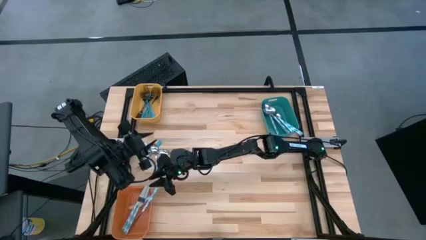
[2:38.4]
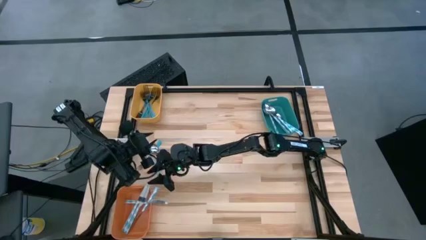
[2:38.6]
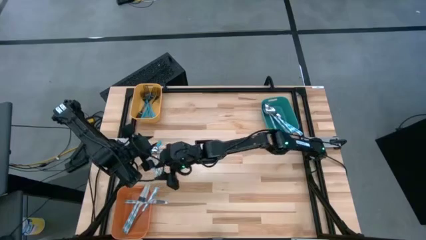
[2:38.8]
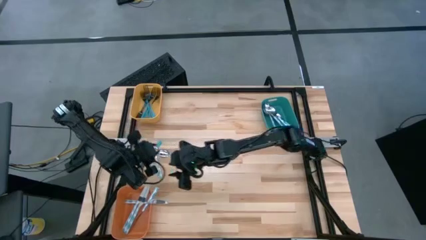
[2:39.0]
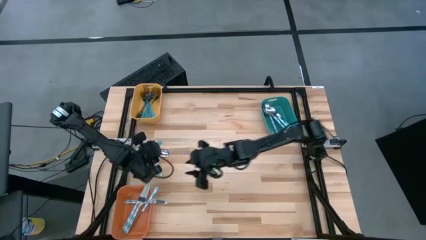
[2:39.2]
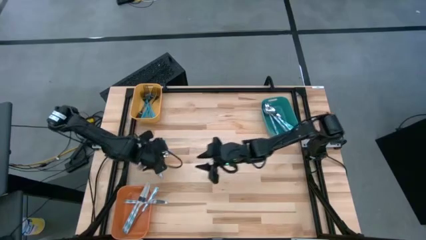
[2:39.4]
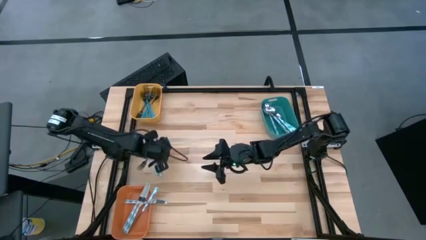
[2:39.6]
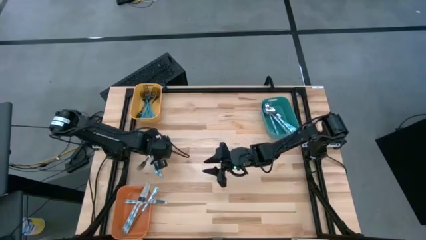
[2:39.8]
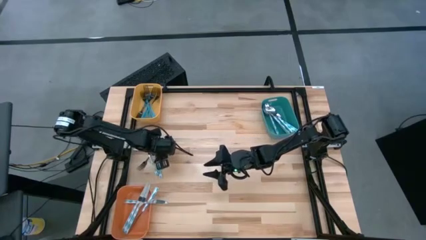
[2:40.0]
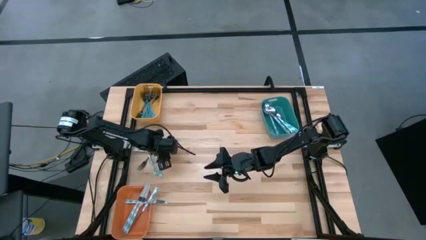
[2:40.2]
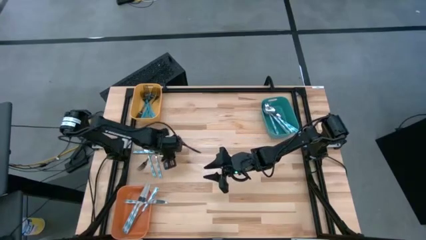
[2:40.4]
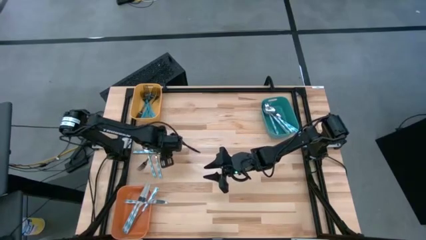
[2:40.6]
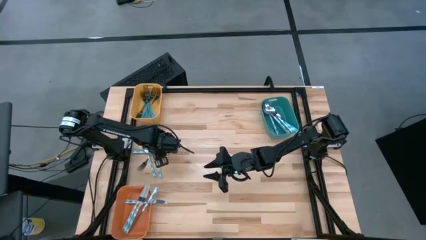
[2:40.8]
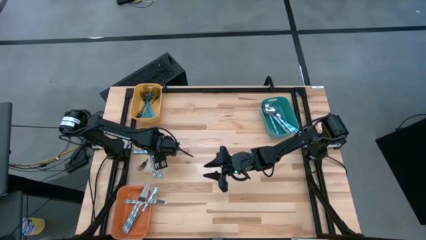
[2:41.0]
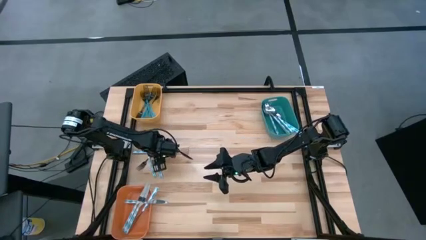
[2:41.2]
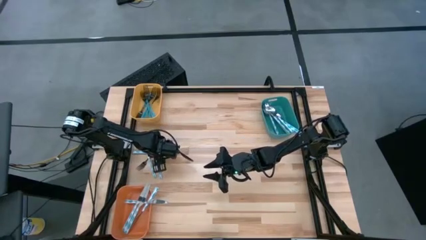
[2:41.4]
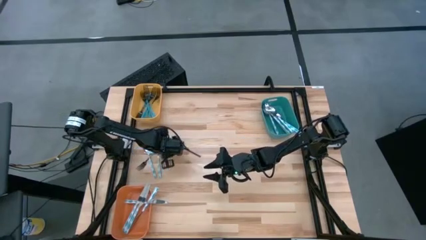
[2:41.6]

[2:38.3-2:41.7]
Task: Sort silverware by color (type)
Put the white-blue spoon into the blue bin

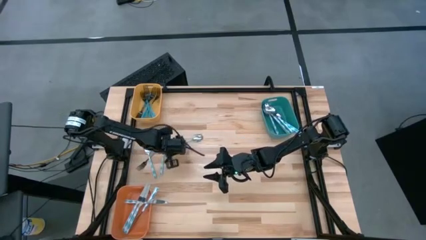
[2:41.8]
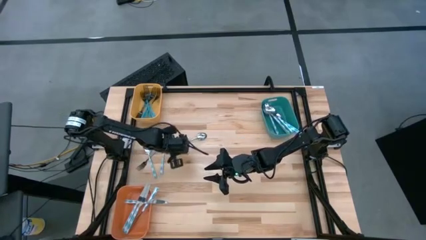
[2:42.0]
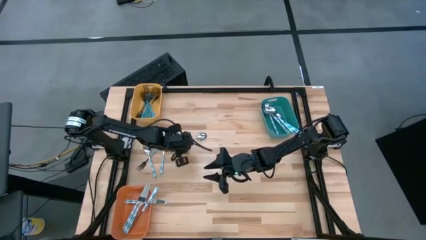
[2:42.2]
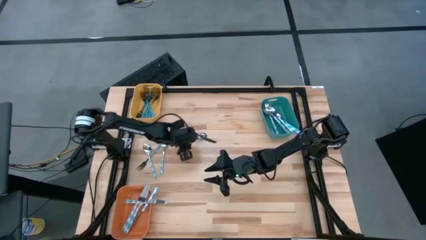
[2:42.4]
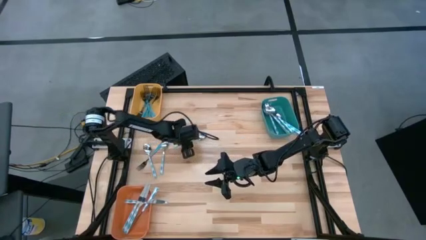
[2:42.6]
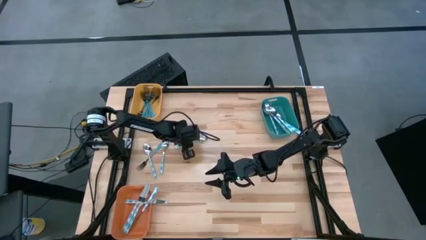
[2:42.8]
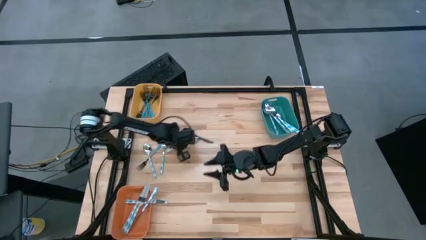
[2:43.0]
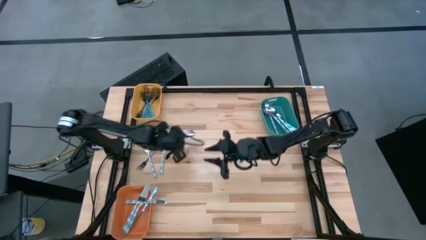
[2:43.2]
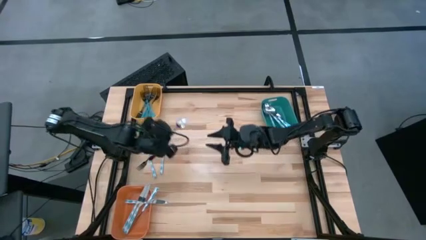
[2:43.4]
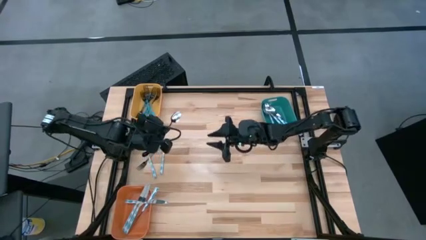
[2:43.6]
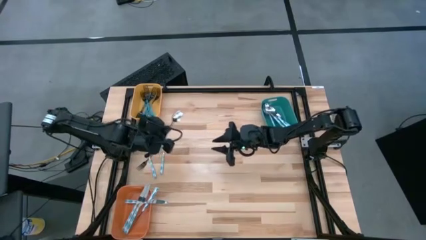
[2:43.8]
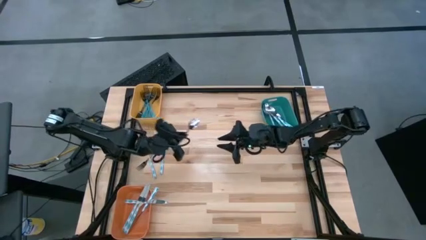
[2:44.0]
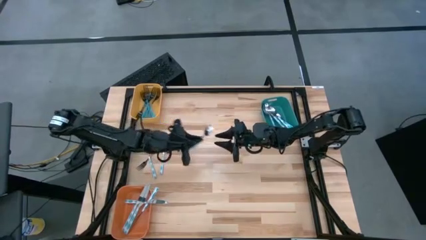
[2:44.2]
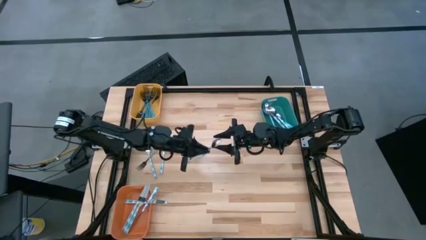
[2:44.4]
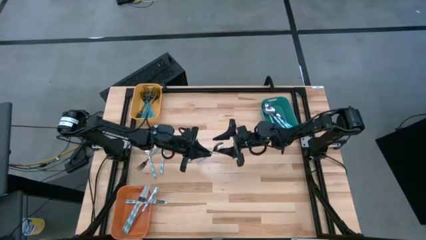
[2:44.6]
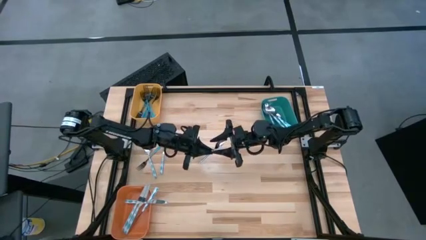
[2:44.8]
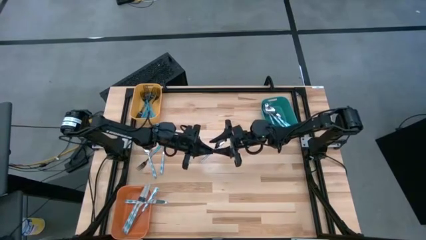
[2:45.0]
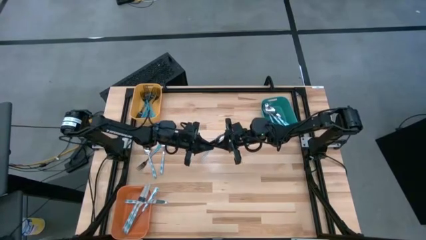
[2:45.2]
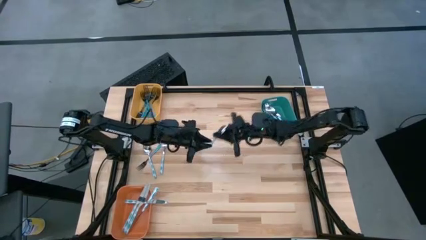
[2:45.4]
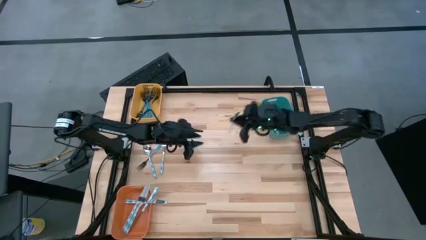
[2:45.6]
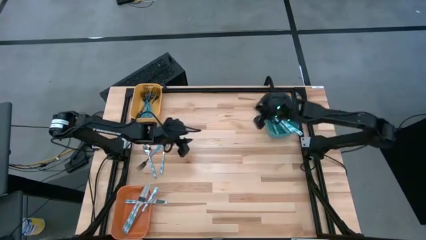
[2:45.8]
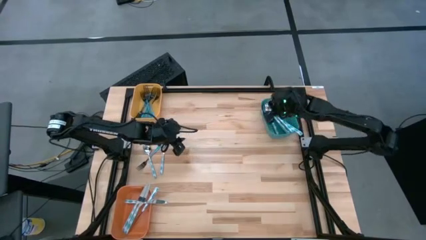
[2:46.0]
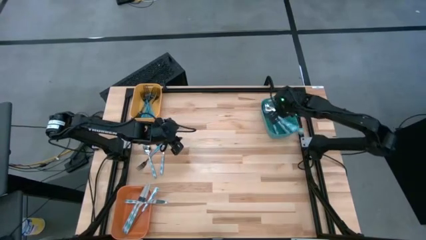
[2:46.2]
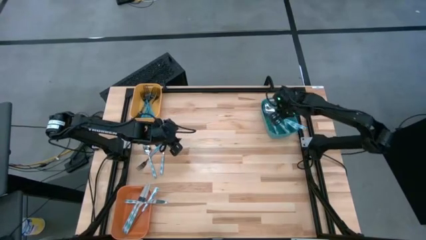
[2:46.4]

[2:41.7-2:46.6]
Put the white-blue spoon into the blue bin

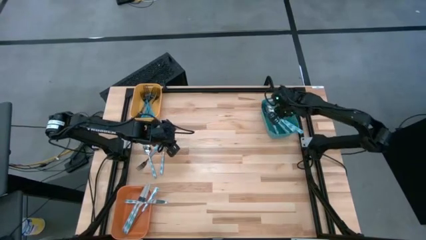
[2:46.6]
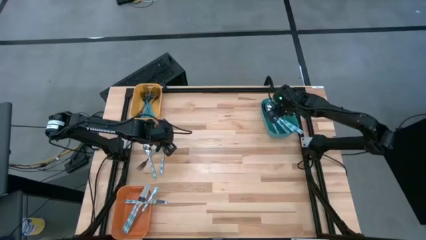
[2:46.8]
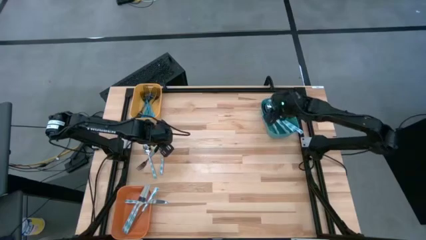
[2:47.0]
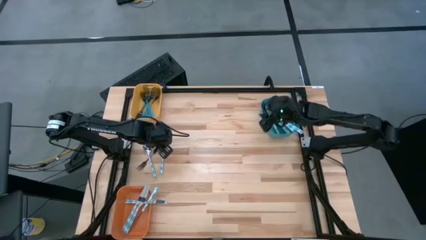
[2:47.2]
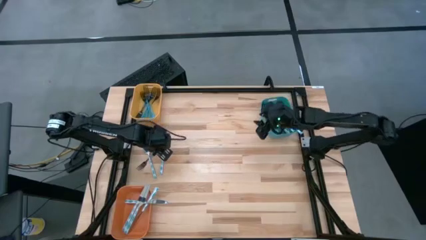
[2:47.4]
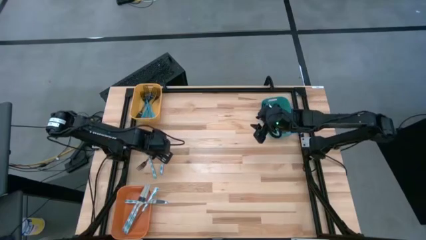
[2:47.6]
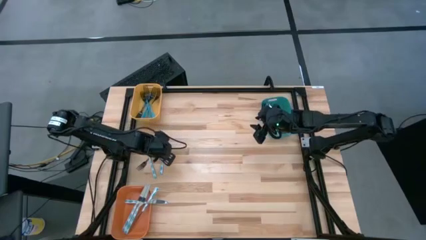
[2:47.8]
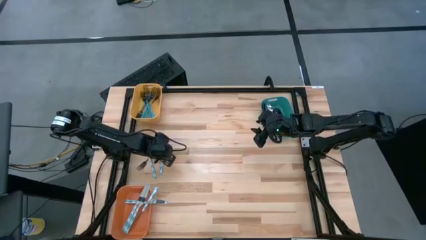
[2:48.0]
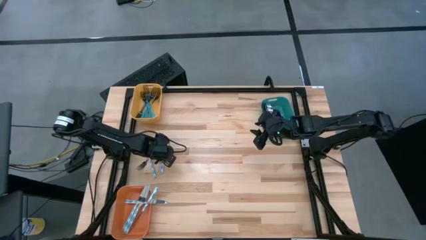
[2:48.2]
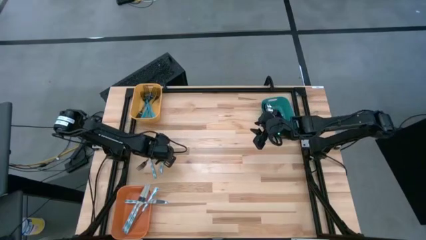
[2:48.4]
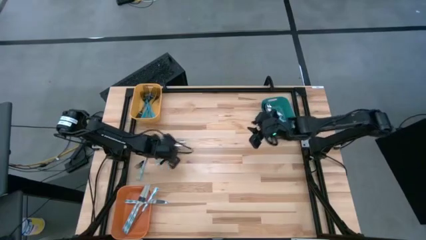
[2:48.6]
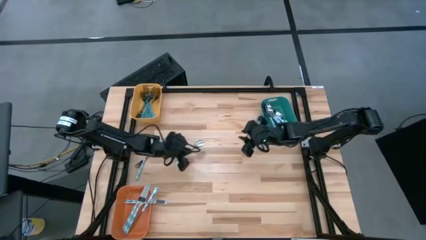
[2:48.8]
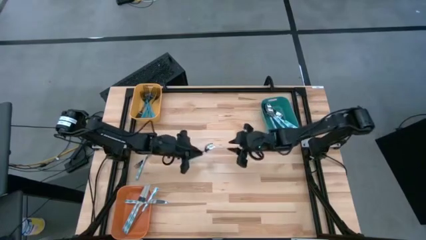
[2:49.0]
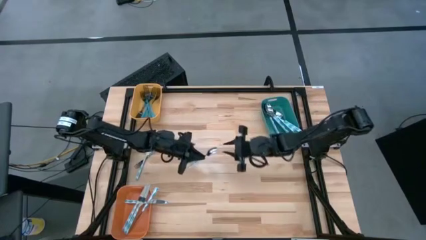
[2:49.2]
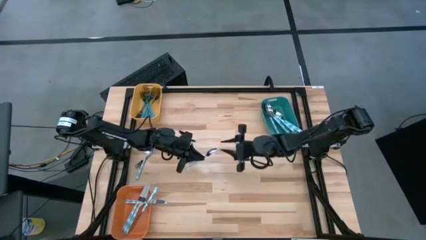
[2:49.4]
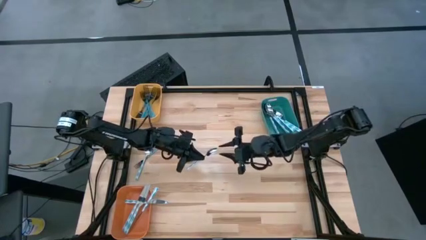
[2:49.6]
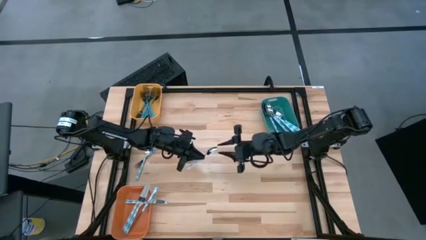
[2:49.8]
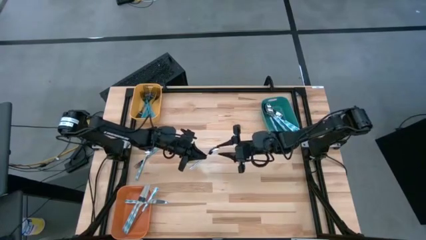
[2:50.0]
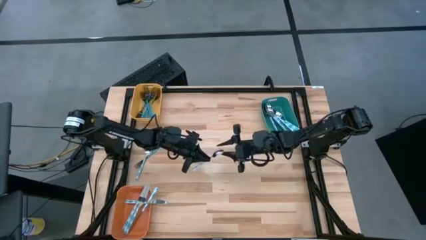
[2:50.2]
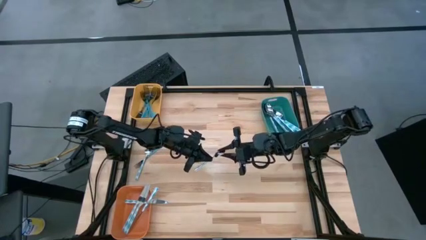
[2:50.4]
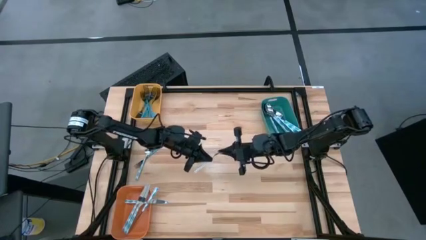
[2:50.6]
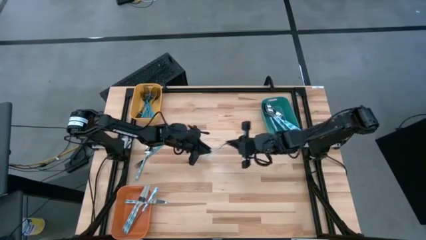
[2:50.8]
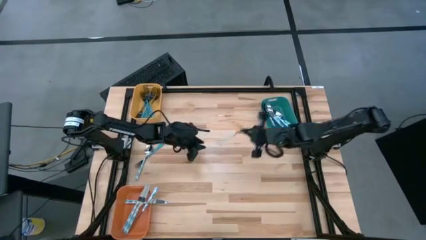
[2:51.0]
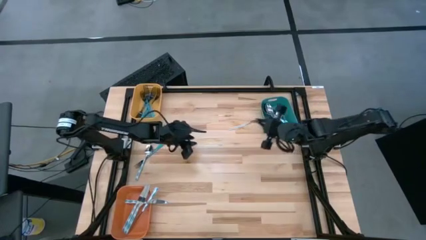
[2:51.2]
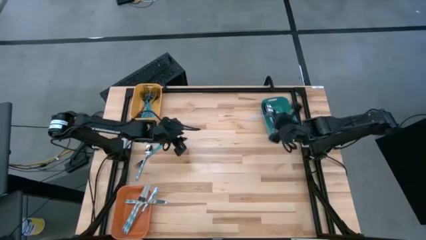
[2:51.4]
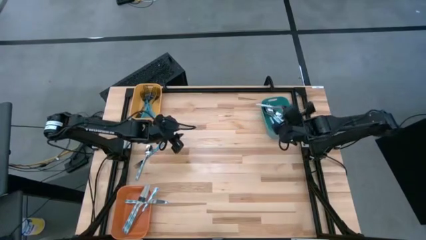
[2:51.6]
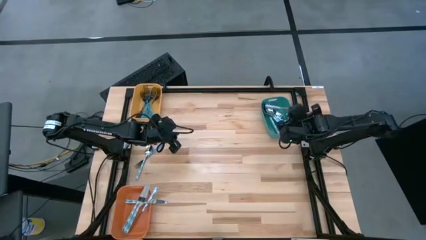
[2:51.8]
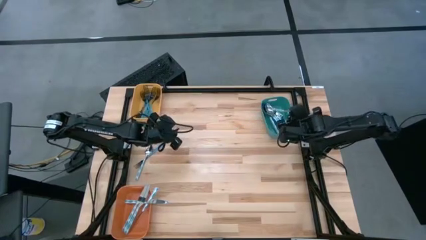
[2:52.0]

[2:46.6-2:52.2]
Put the white-blue spoon into the blue bin

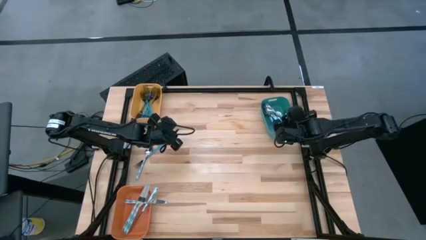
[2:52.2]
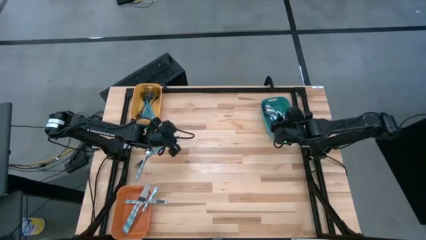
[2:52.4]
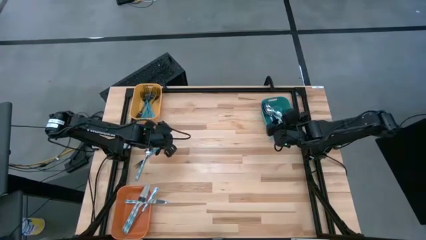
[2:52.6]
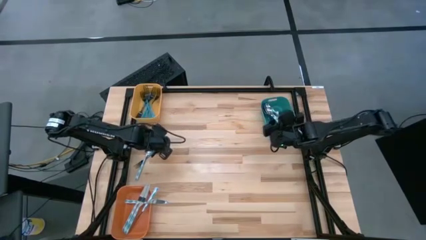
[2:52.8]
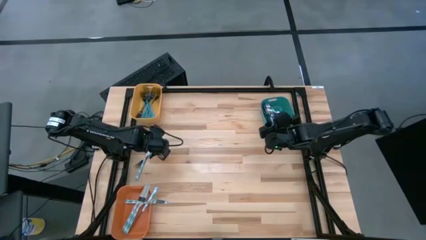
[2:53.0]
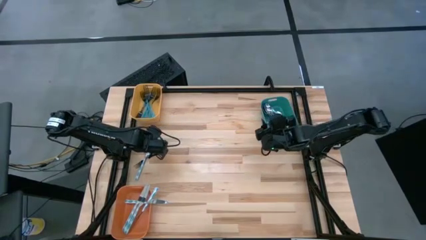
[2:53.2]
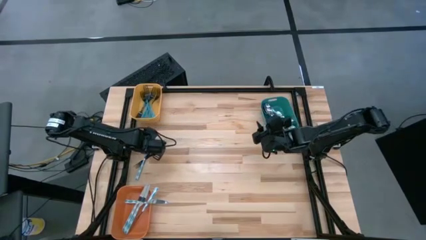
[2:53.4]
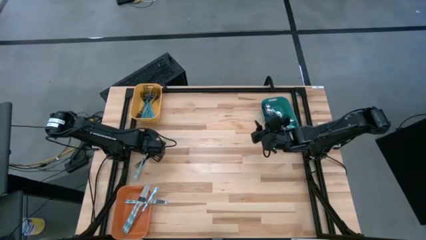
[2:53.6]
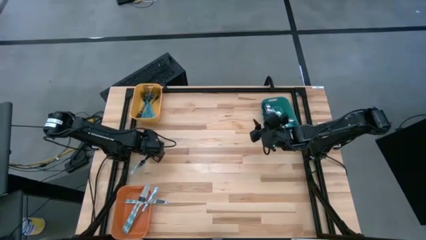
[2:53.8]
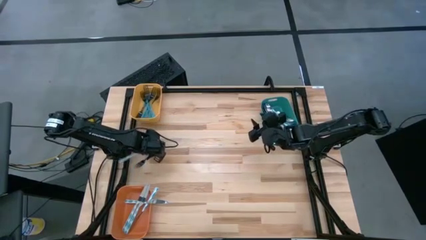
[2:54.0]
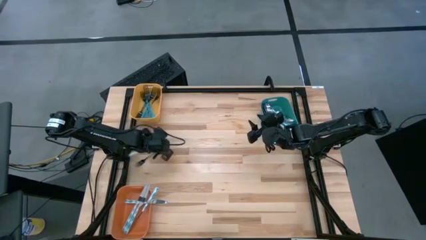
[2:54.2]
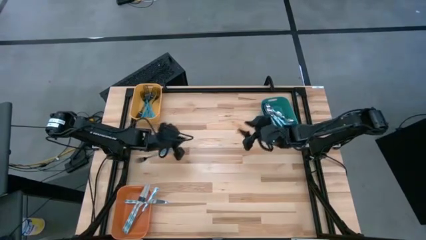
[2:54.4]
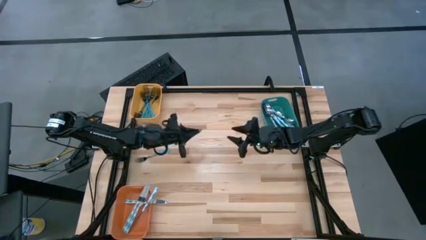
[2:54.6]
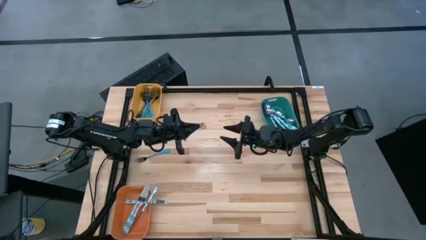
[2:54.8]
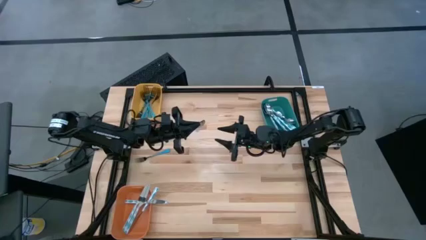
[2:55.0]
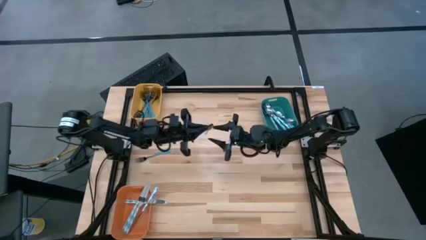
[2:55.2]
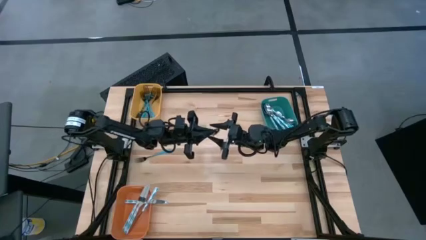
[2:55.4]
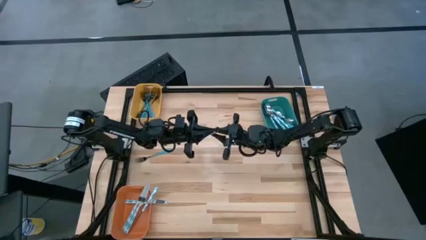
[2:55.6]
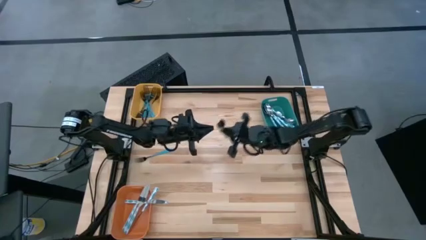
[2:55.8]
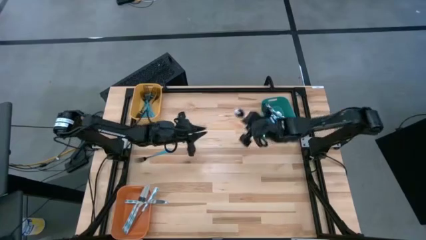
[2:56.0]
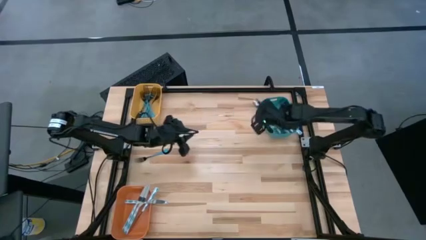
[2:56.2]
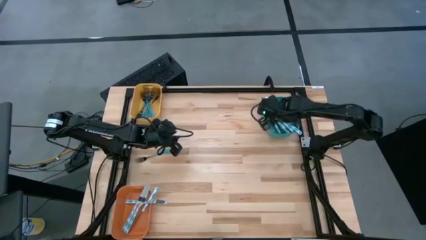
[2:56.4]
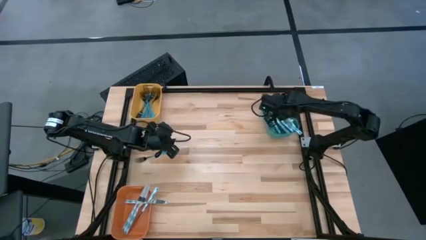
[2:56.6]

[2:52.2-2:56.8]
Put the white-blue spoon into the blue bin
